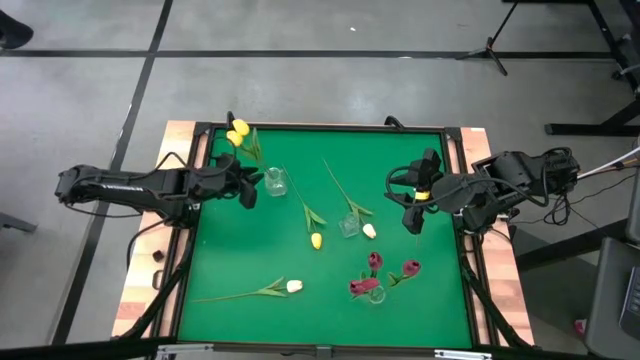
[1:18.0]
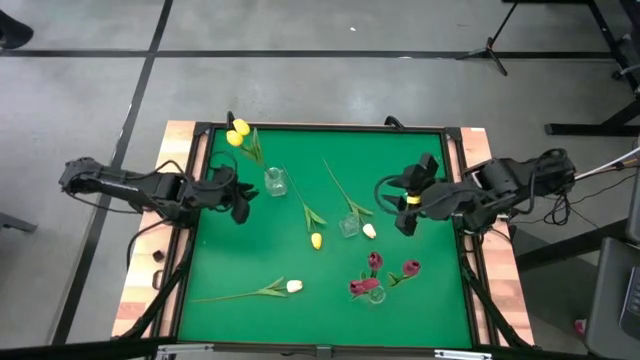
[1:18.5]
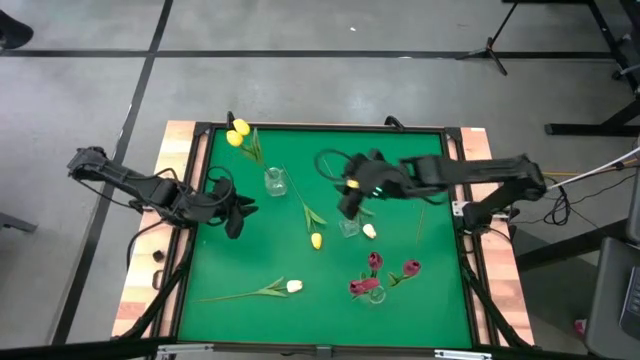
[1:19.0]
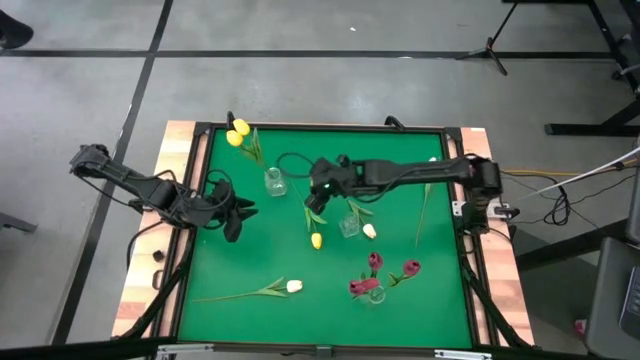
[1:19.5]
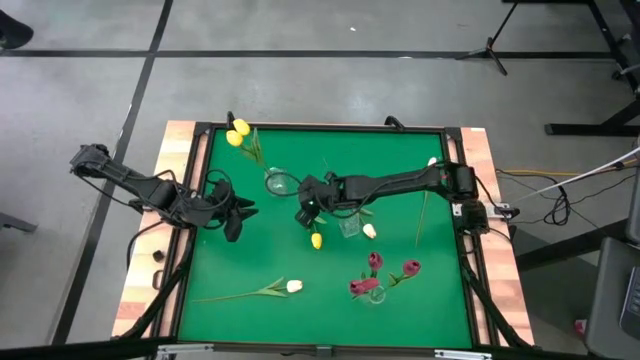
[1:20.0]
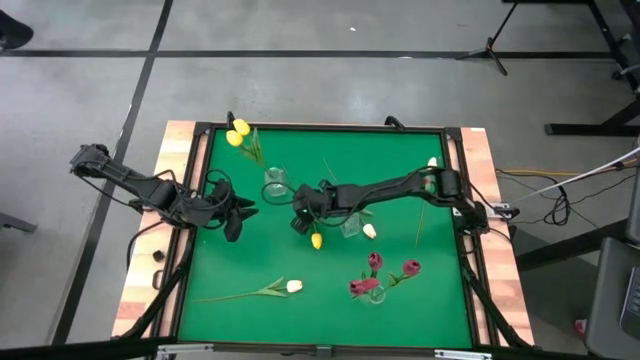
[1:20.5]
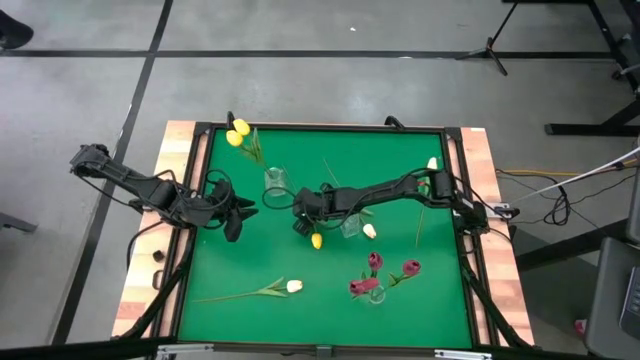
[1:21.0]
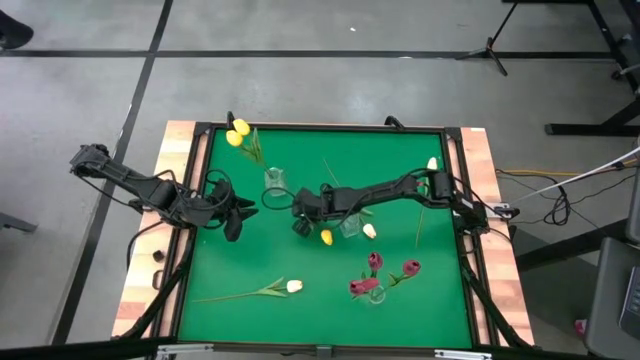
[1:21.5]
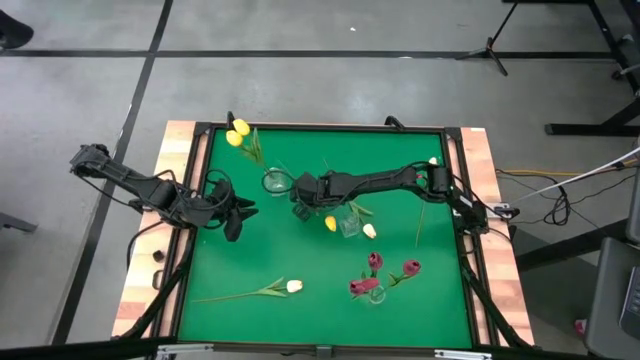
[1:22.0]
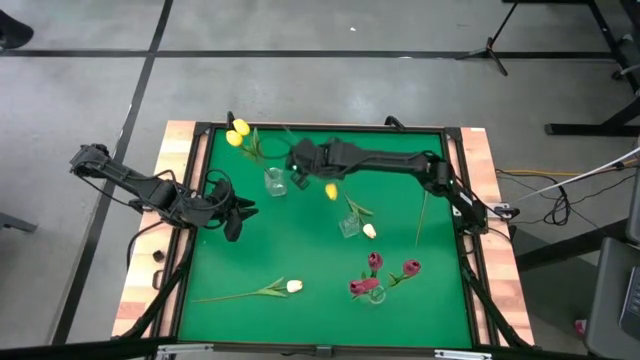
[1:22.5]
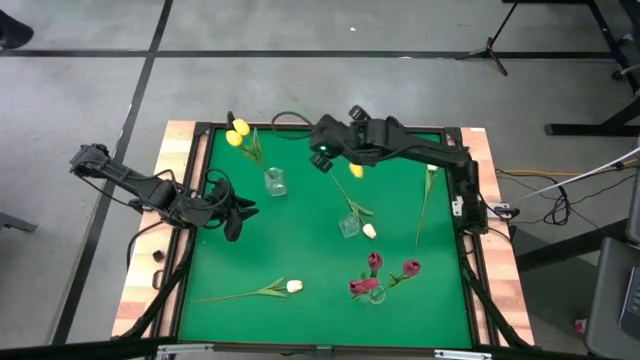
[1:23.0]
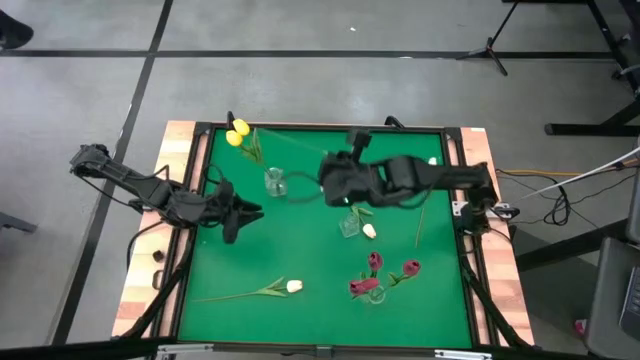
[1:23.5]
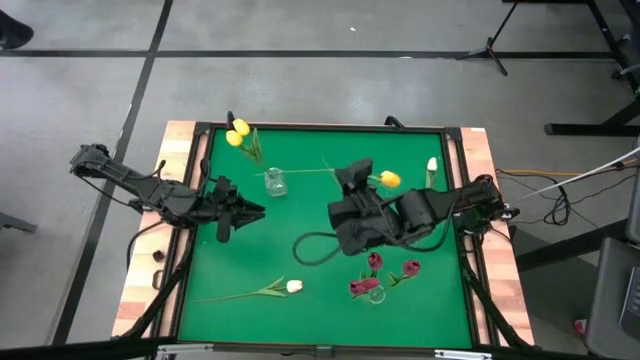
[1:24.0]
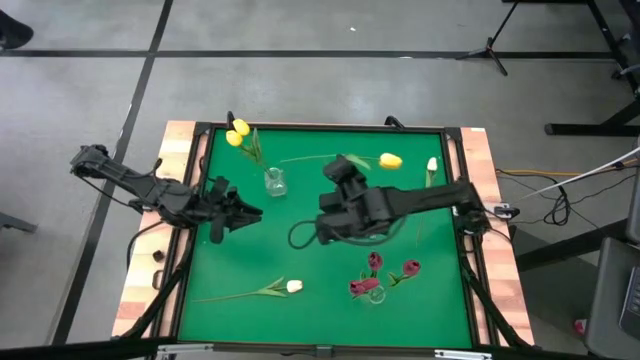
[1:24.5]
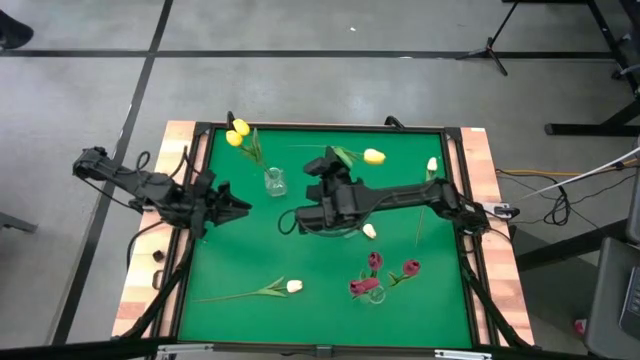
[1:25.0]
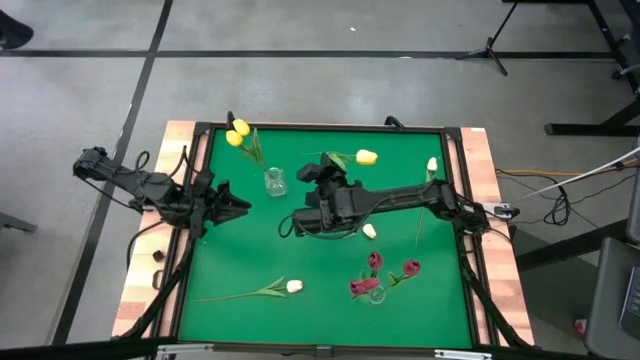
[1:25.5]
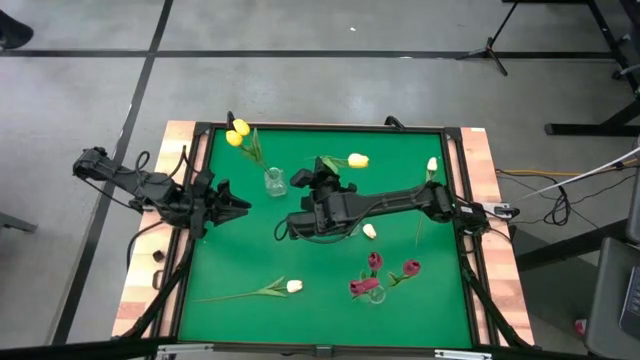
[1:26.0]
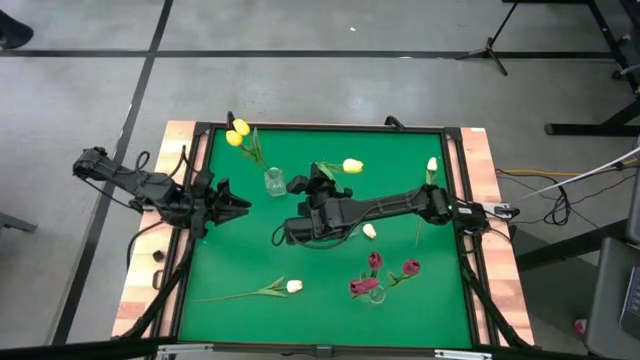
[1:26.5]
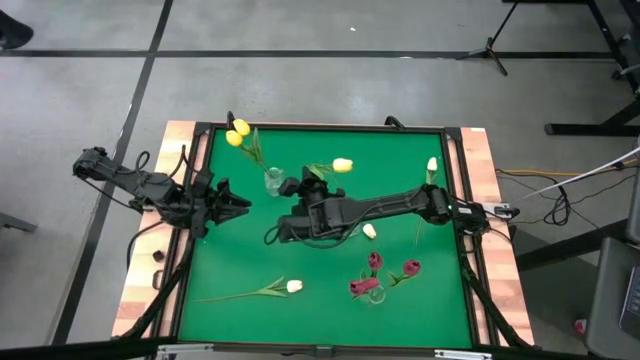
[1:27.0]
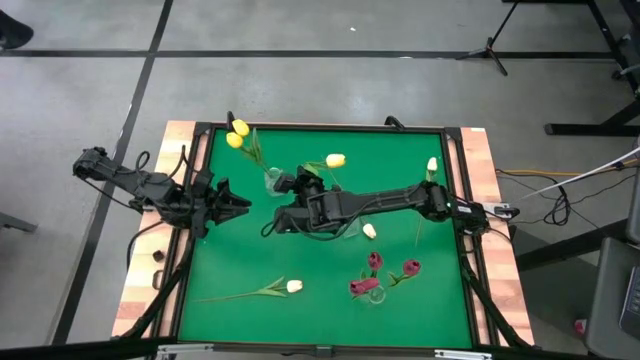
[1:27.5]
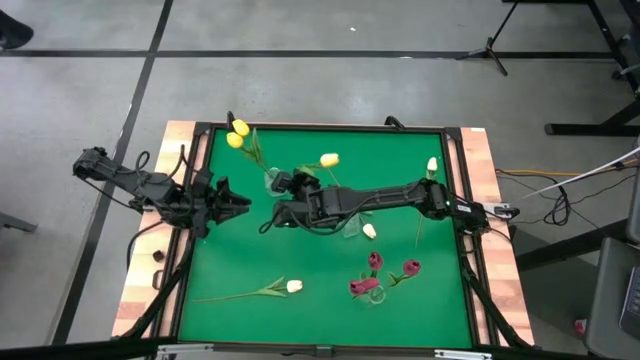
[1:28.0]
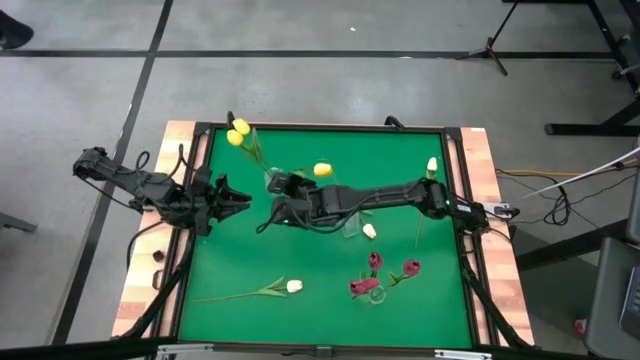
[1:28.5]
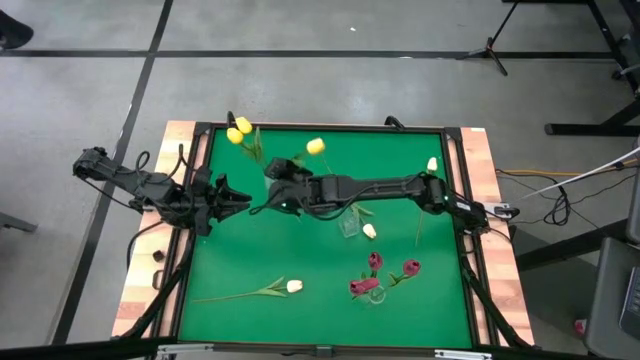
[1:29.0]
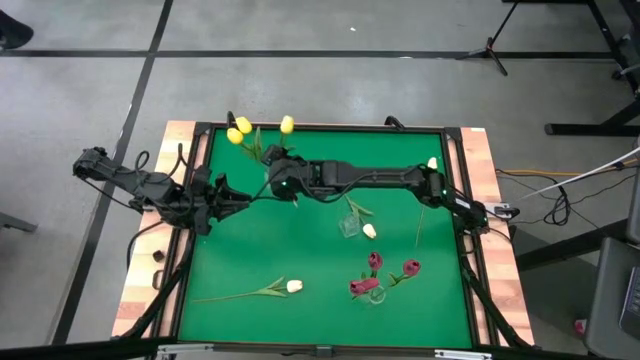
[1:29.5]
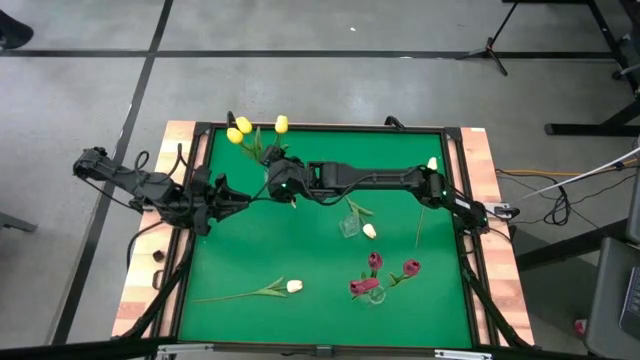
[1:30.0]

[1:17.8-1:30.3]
Task: Sort flowers into vase by color
Put the yellow tulip into the top left transparent vase

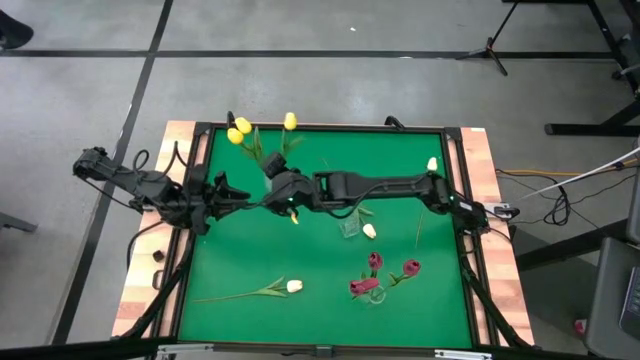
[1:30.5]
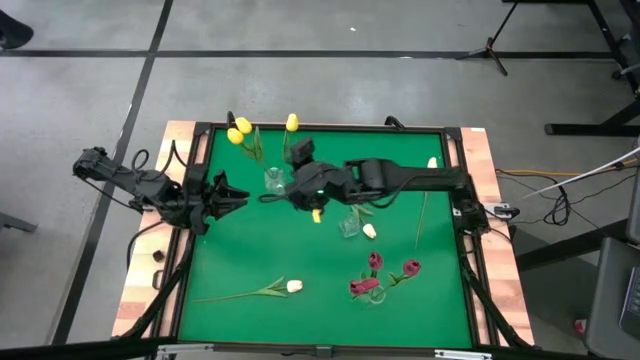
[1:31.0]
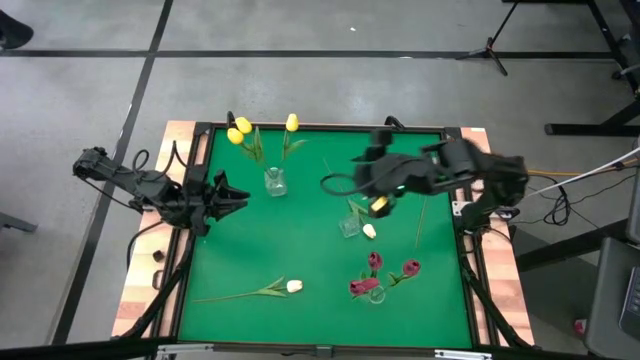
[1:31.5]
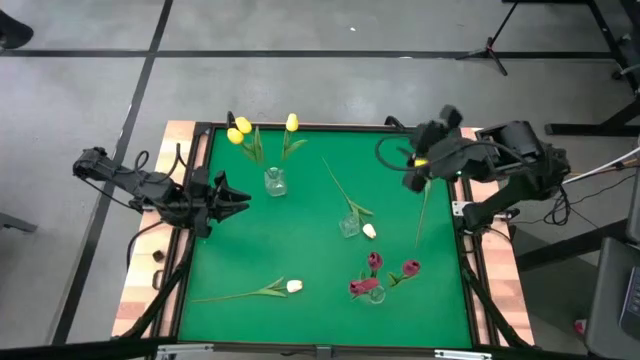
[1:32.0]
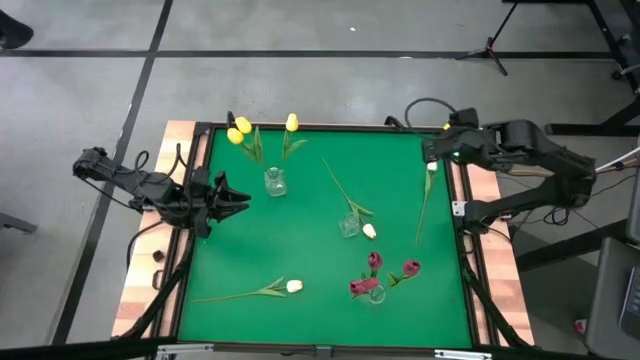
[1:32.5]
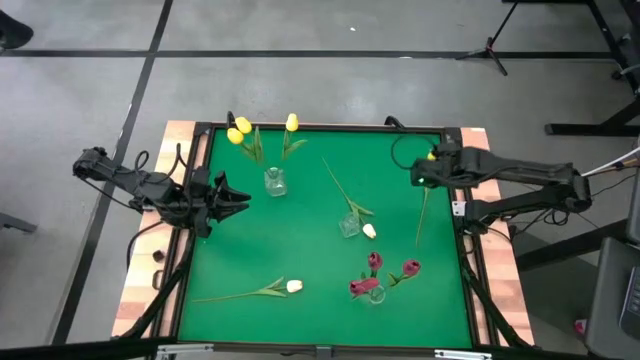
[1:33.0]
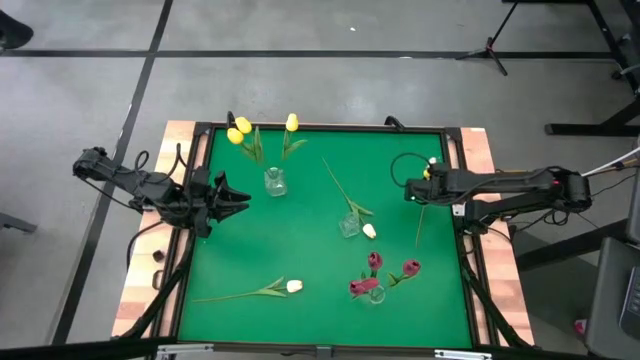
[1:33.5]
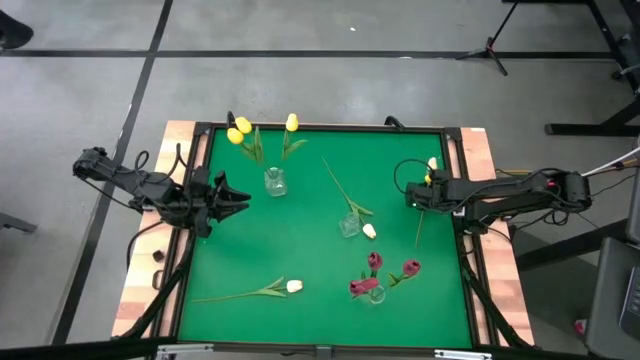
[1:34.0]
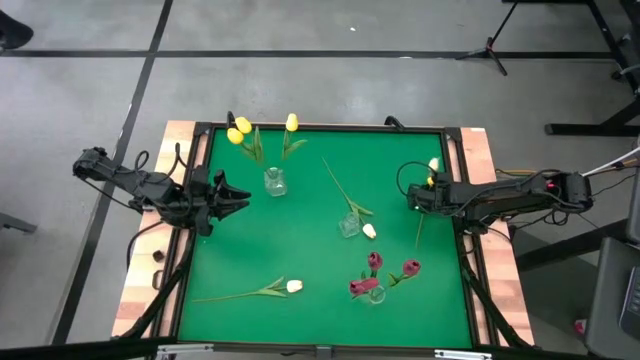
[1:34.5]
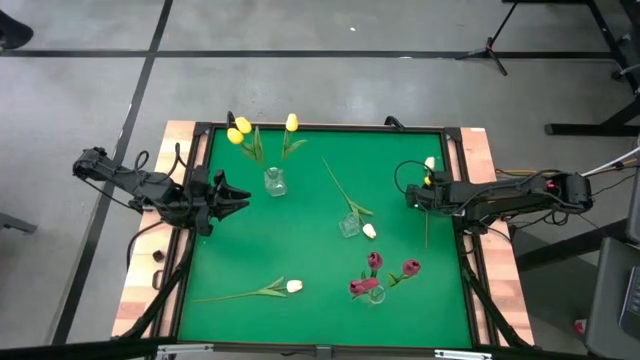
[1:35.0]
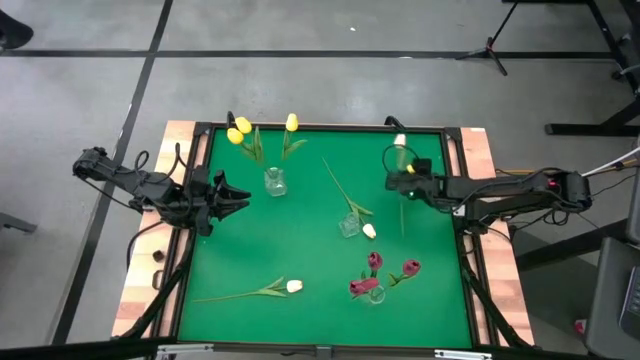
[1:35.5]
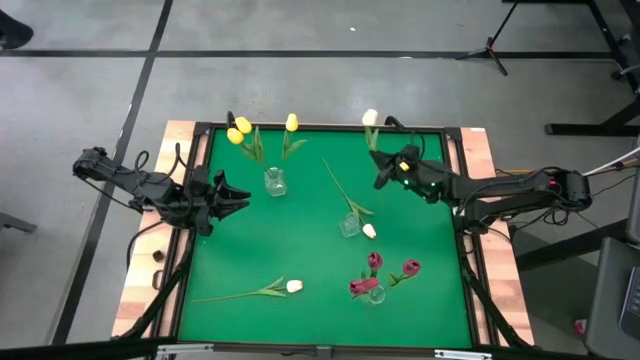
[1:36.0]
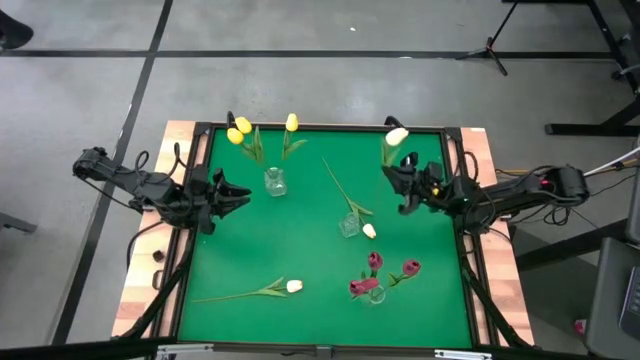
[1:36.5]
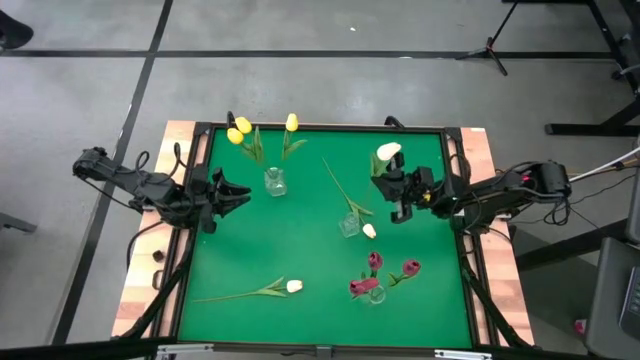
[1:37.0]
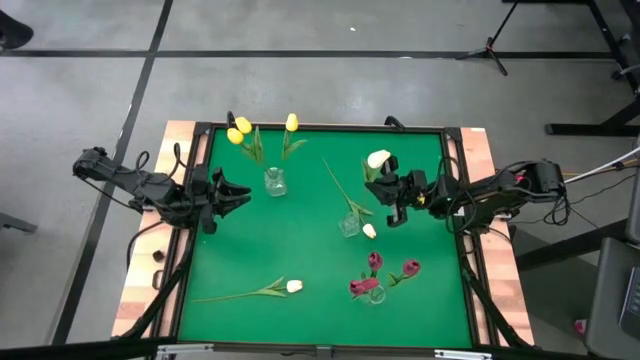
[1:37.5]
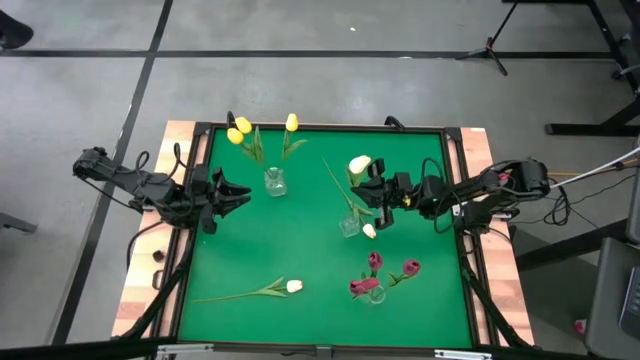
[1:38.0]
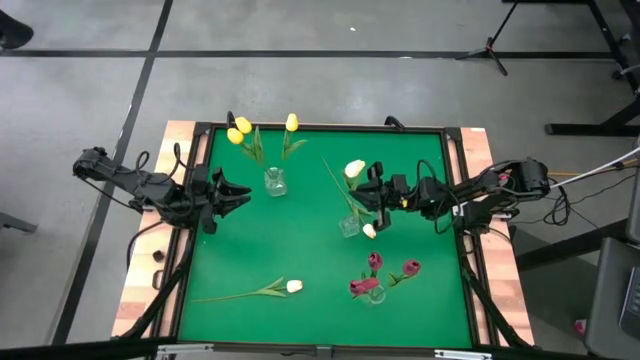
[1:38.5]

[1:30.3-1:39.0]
Put the top right white tulip into the center transparent vase
